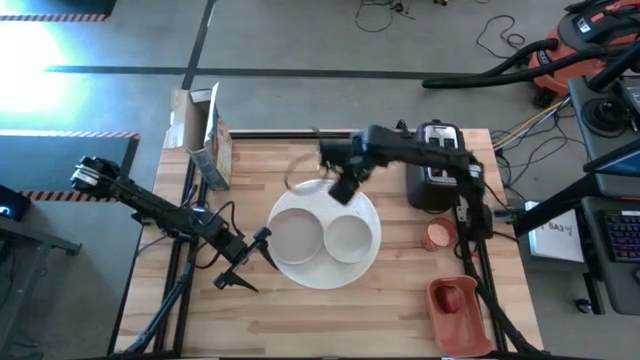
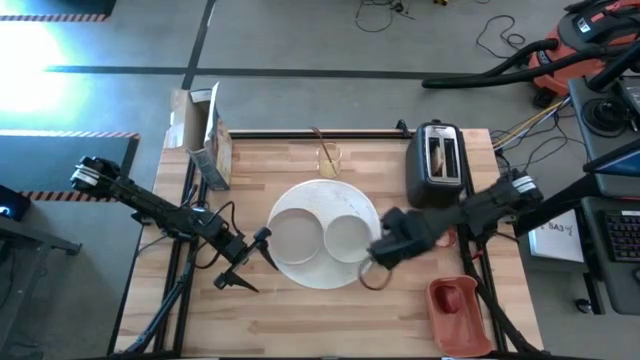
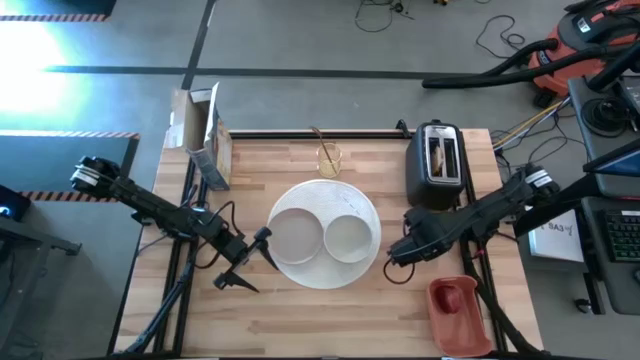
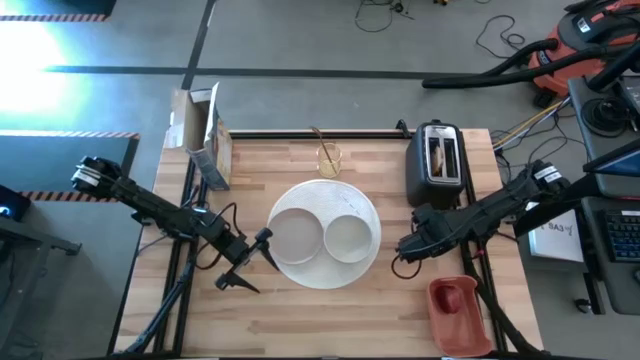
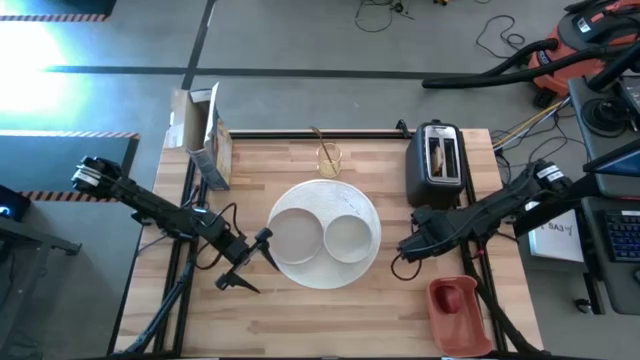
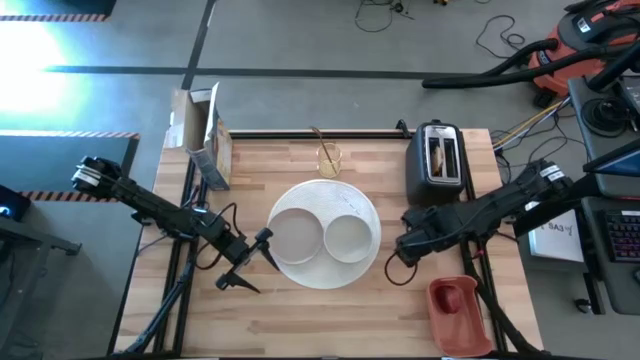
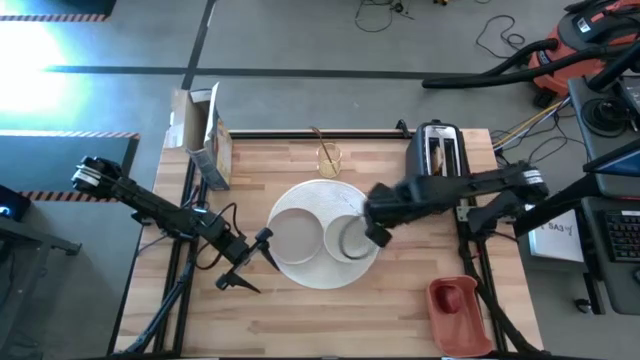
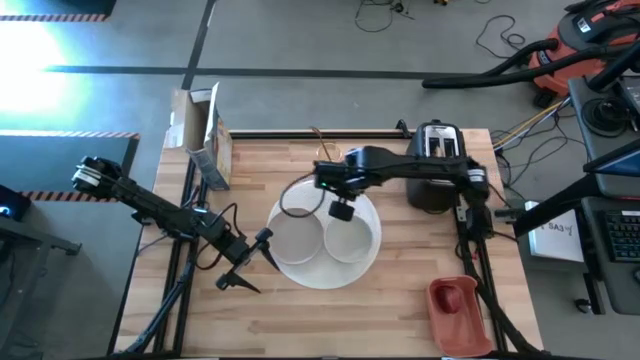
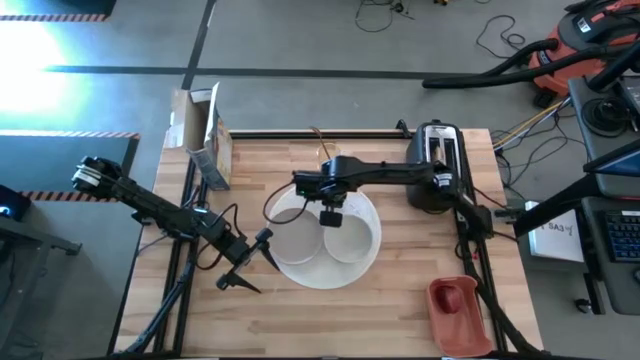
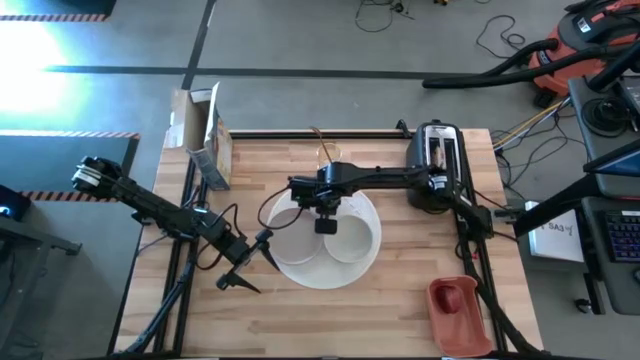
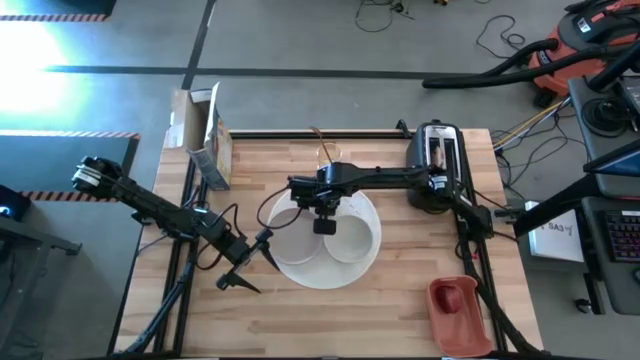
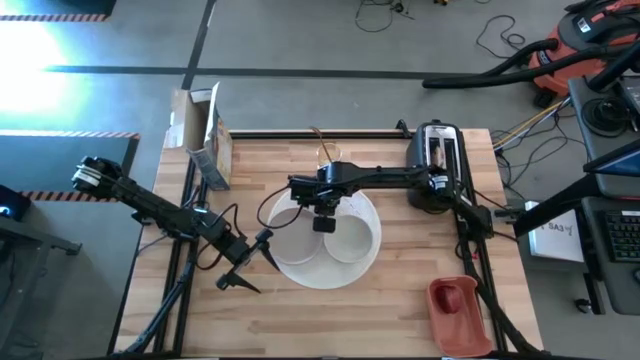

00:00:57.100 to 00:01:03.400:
Task: Arrange a breakfast setting
Put the cup of milk on the placemat on the top of the plate and bowl

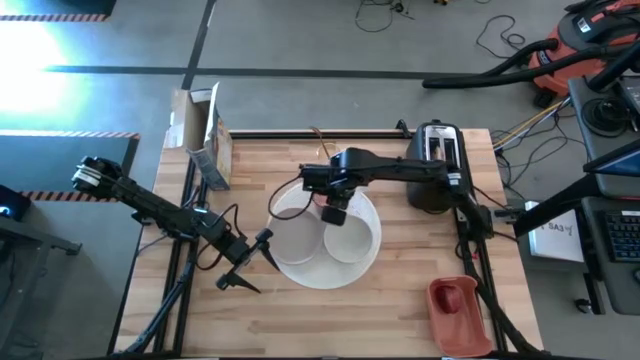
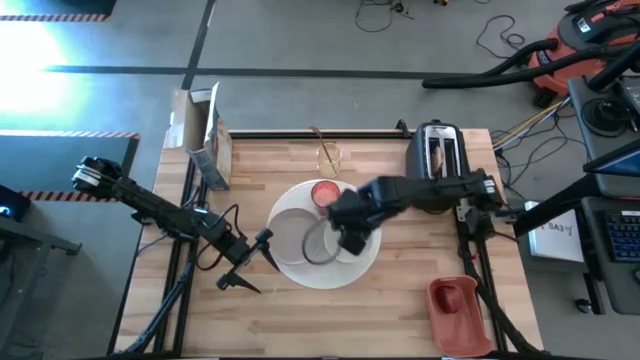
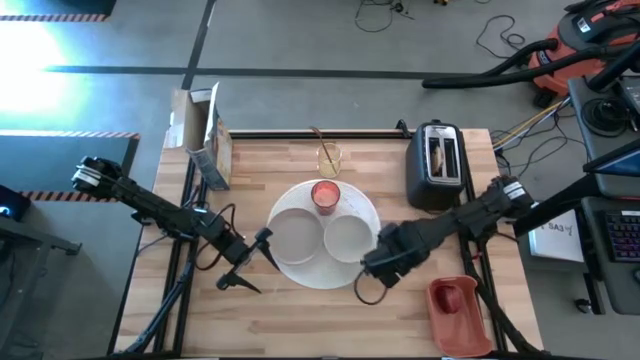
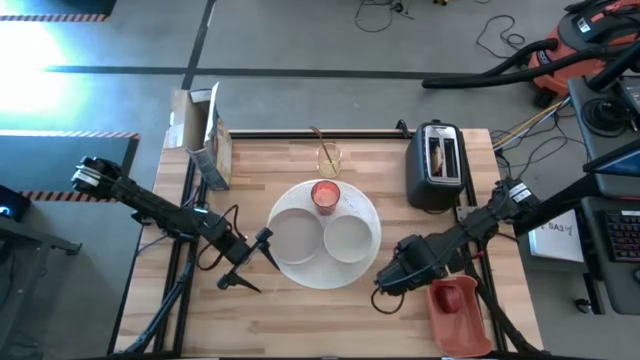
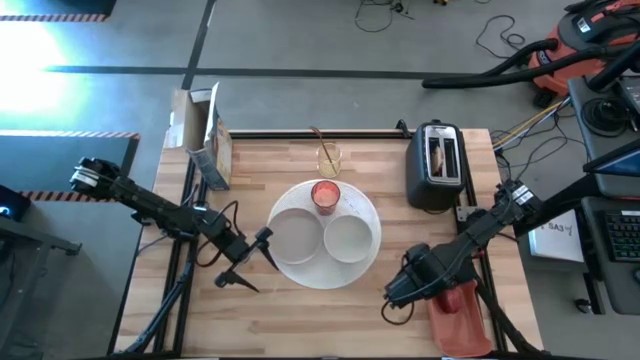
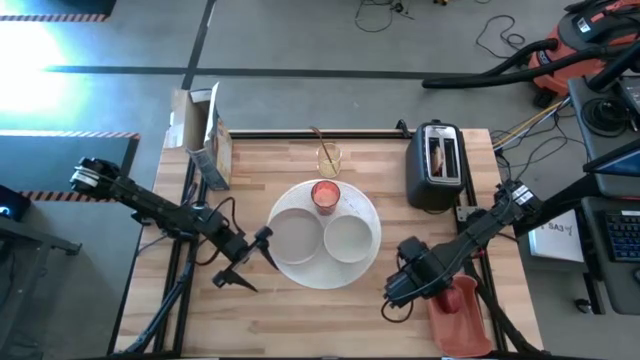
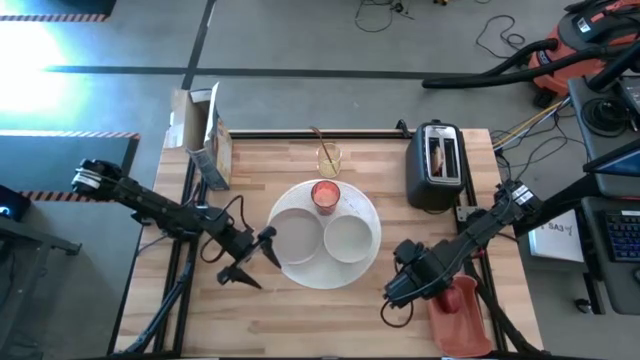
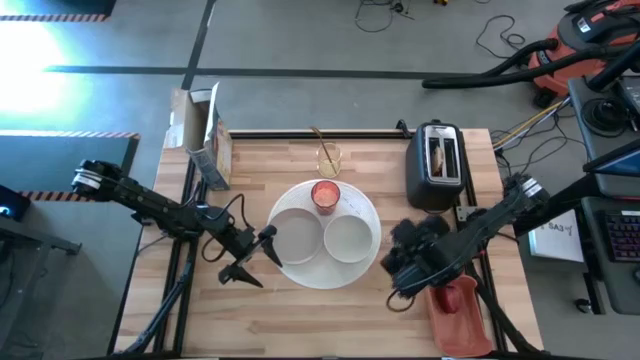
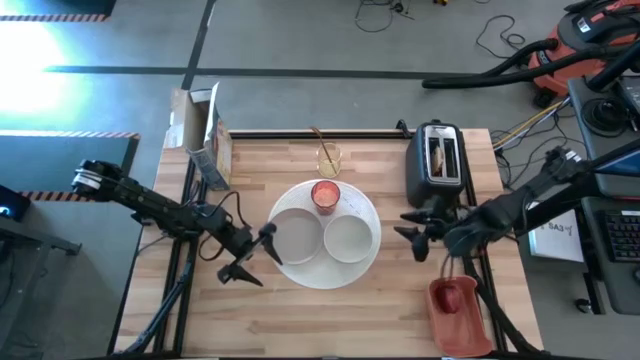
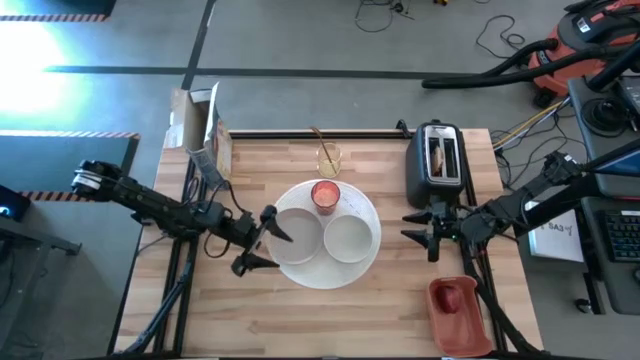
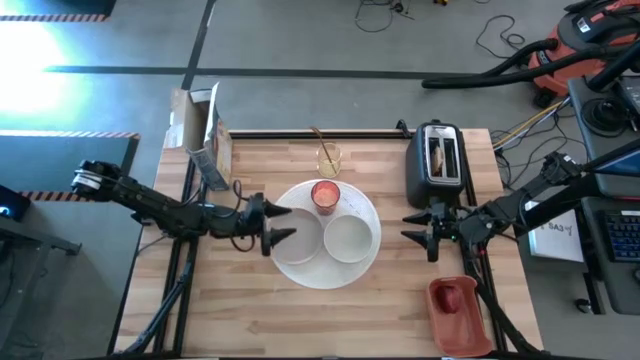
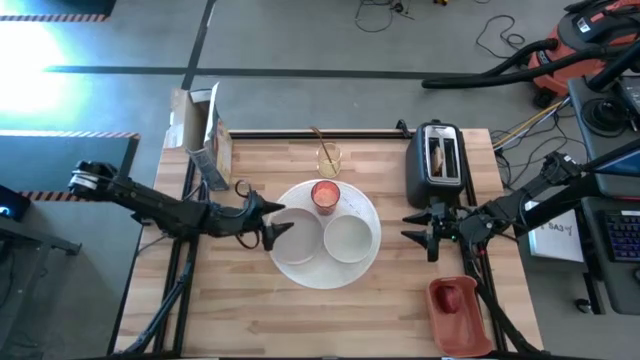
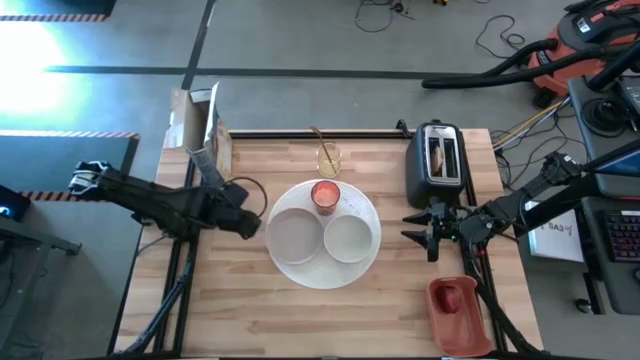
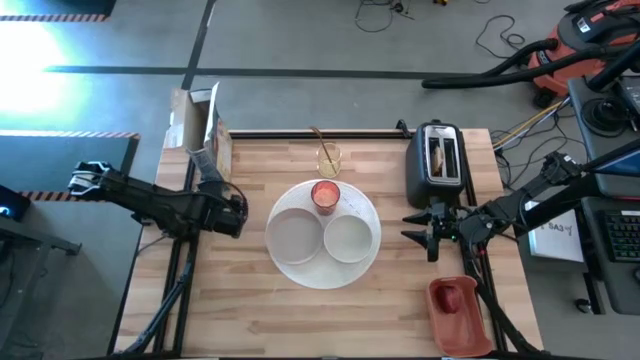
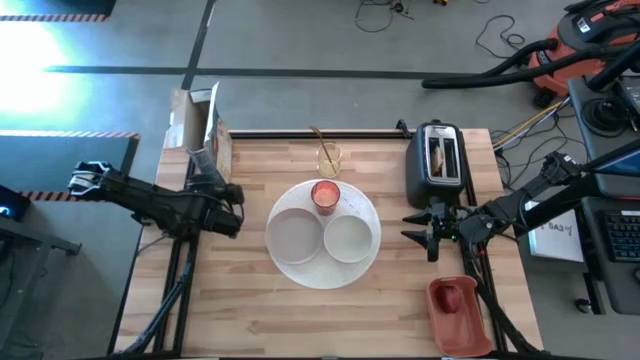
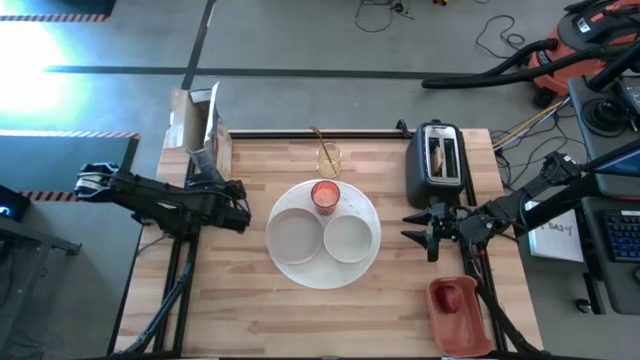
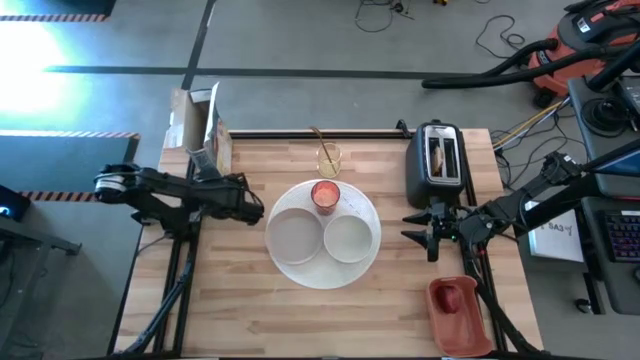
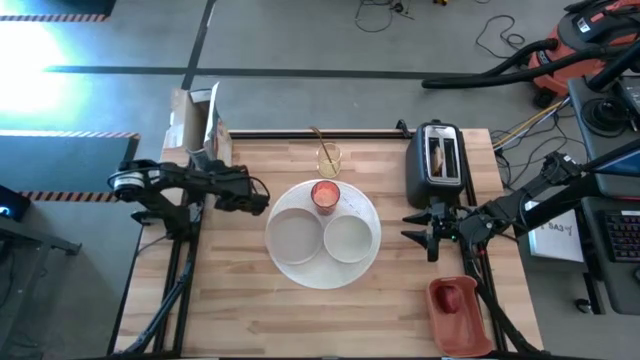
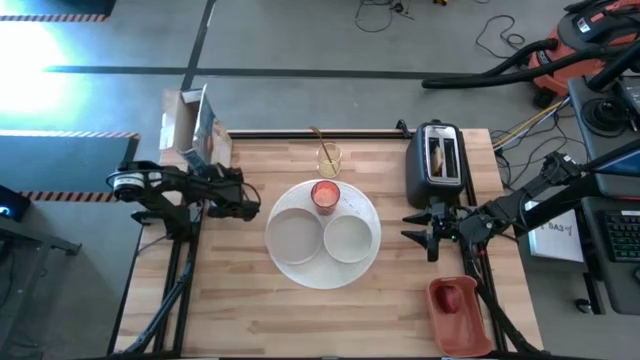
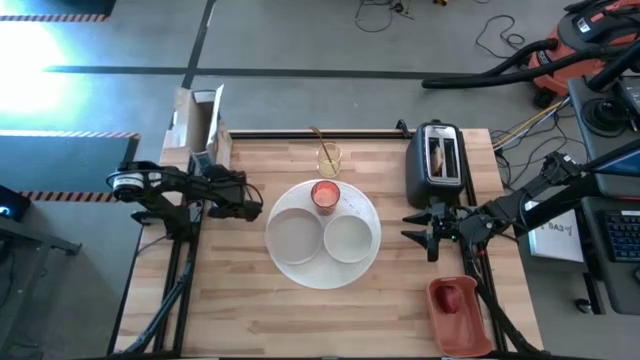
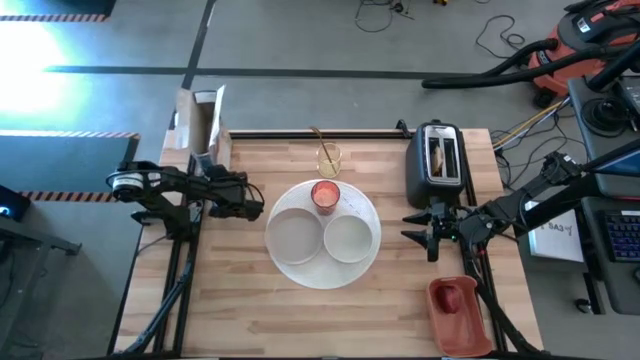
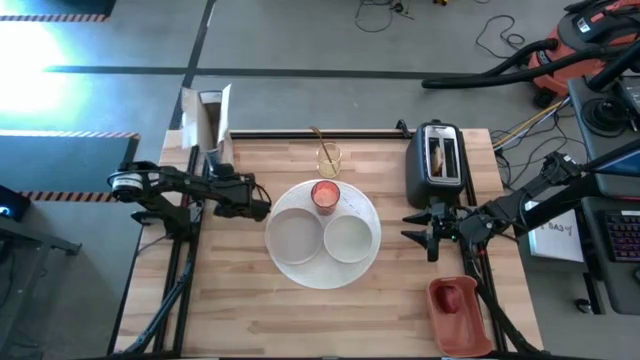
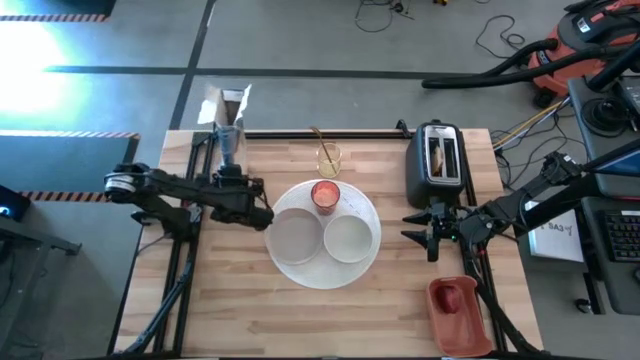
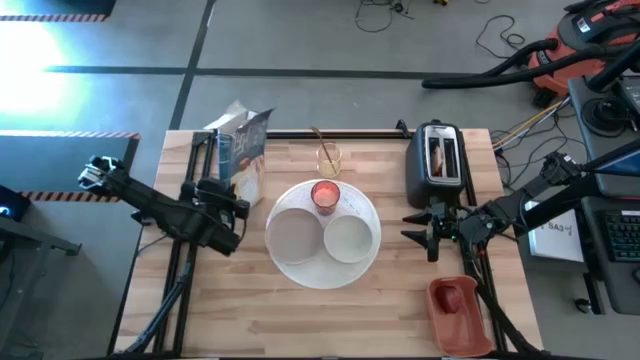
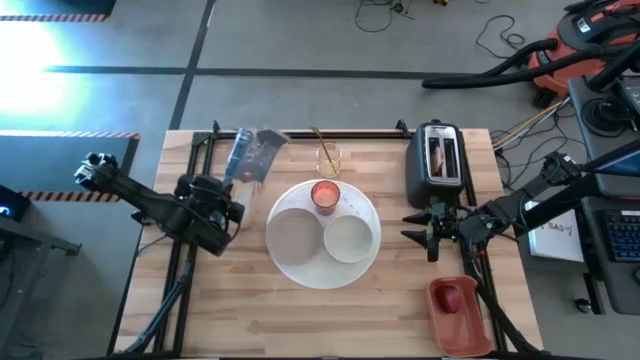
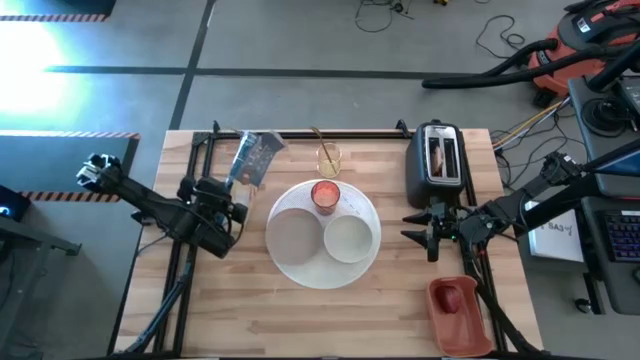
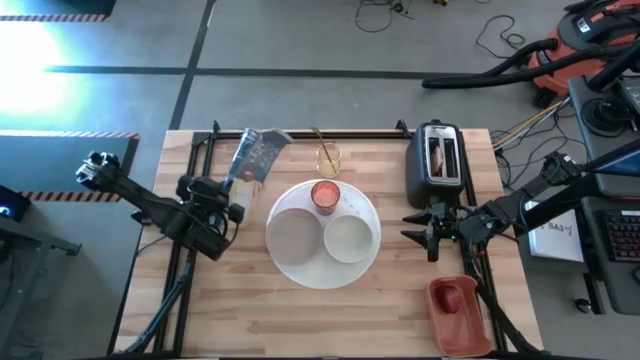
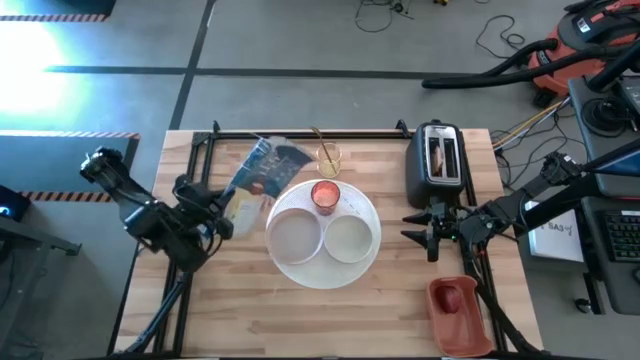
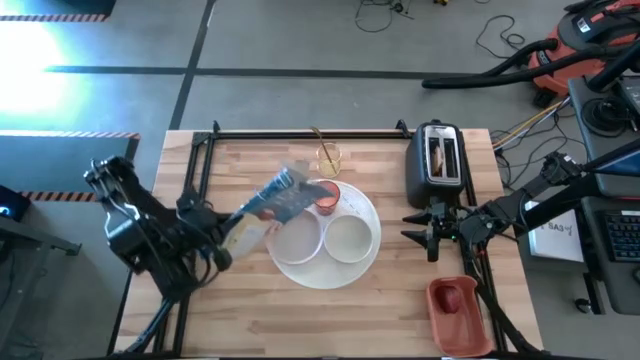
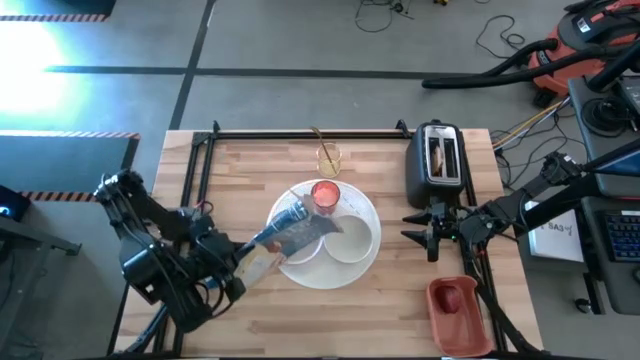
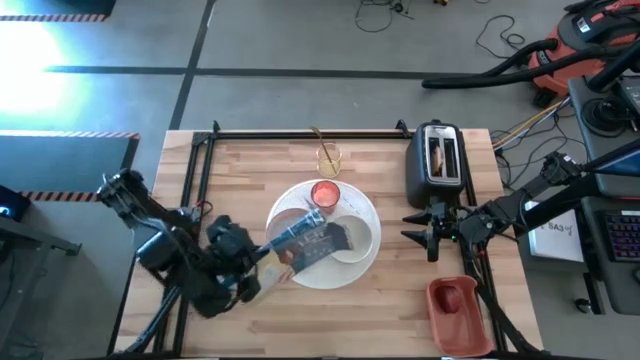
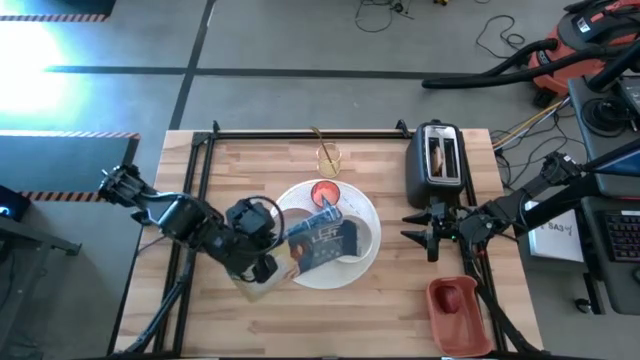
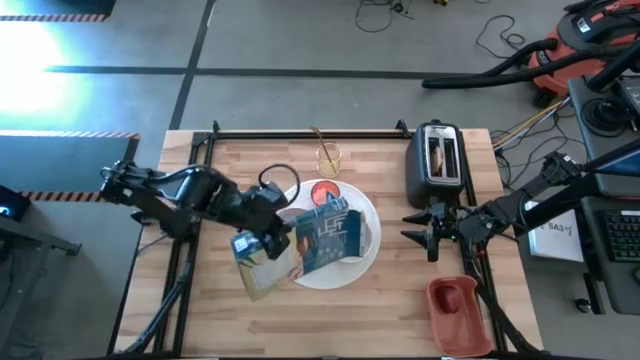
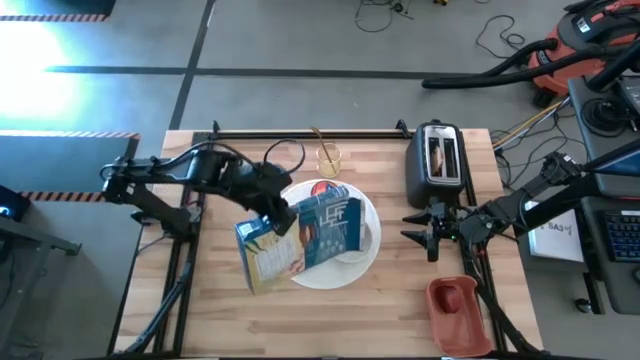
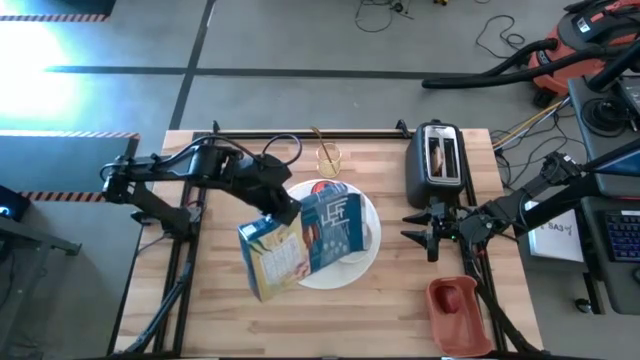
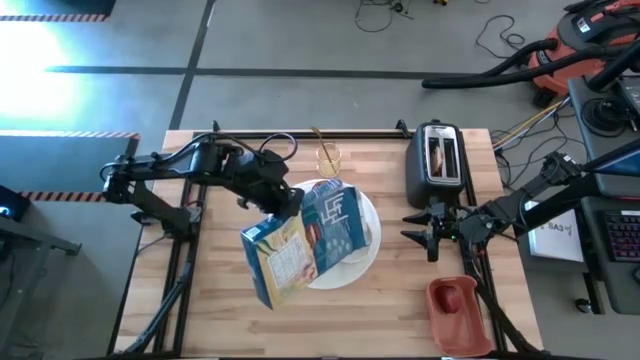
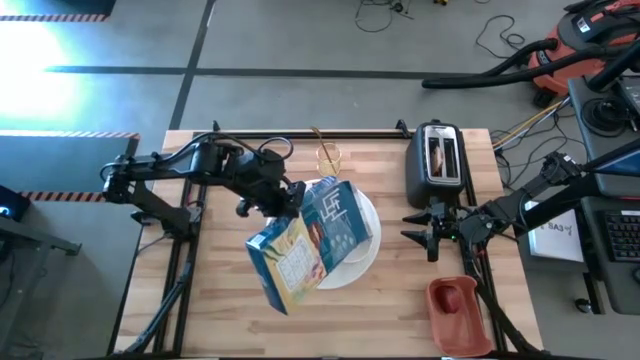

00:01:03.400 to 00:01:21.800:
Pour the cereal from the cereal box into the white bowl
